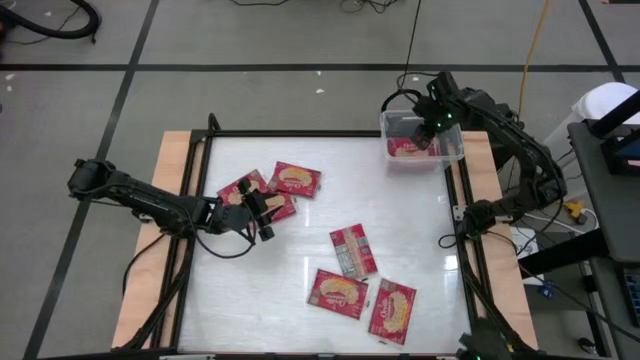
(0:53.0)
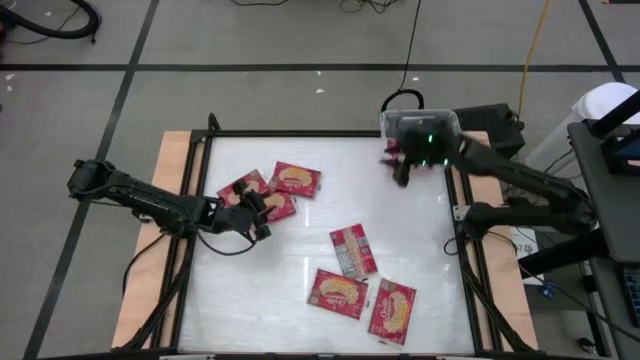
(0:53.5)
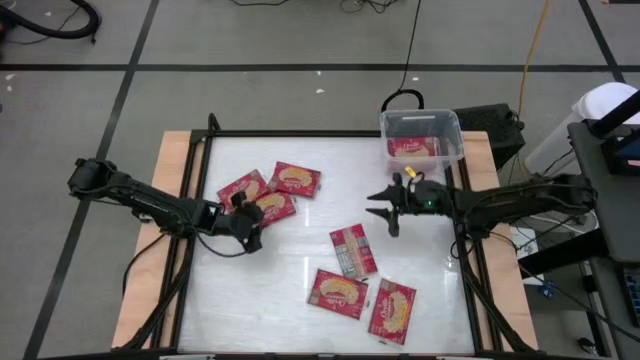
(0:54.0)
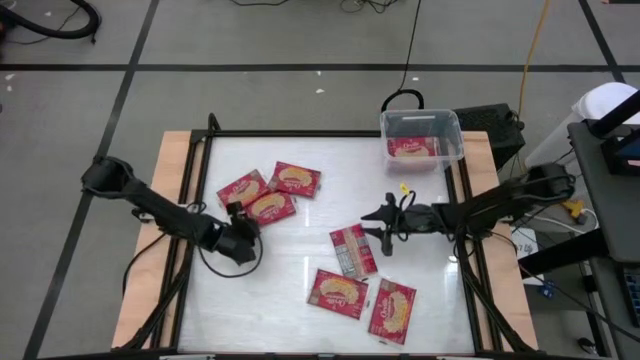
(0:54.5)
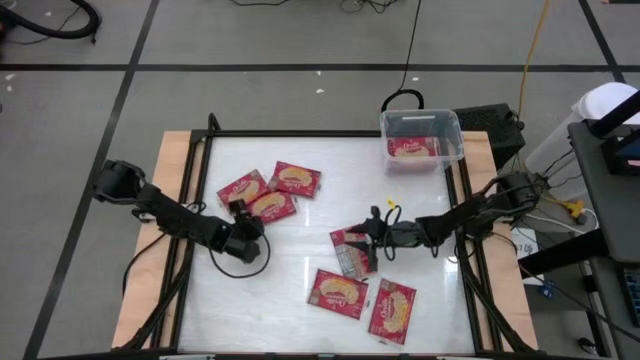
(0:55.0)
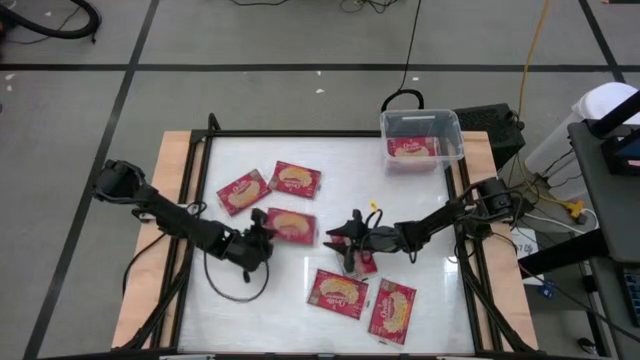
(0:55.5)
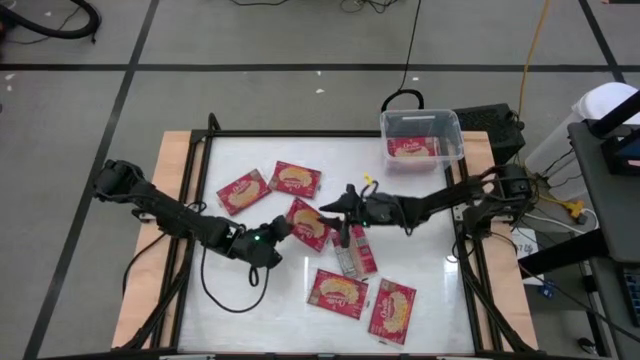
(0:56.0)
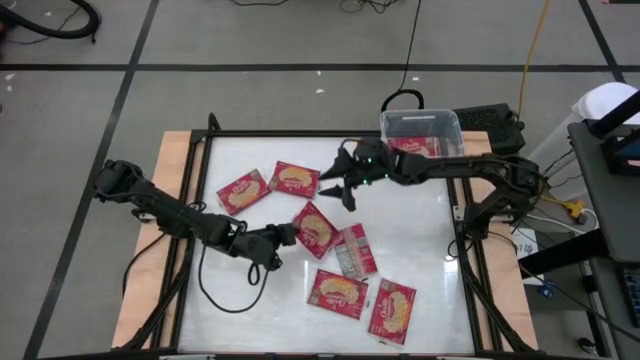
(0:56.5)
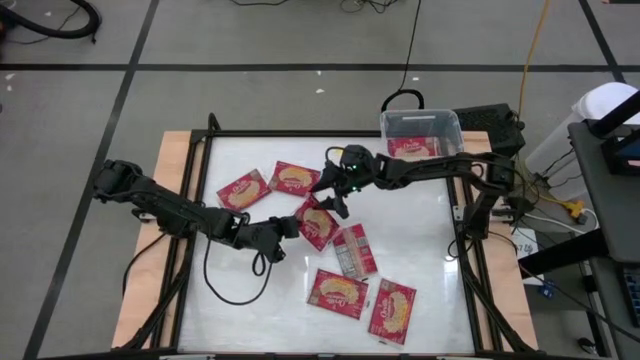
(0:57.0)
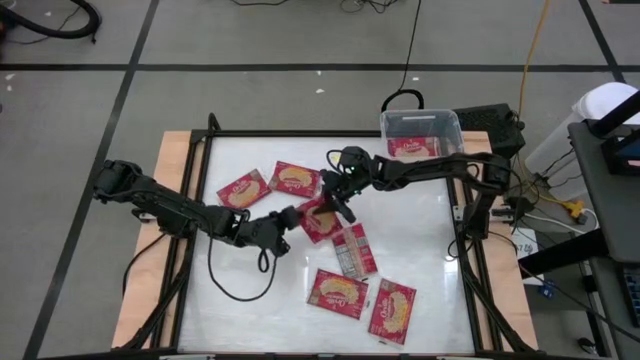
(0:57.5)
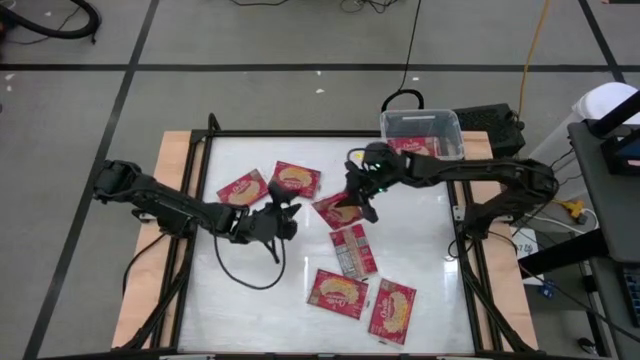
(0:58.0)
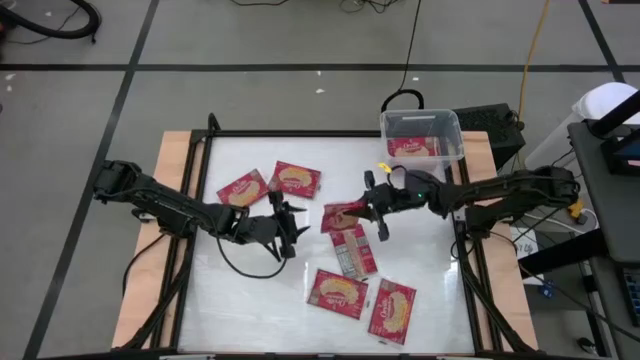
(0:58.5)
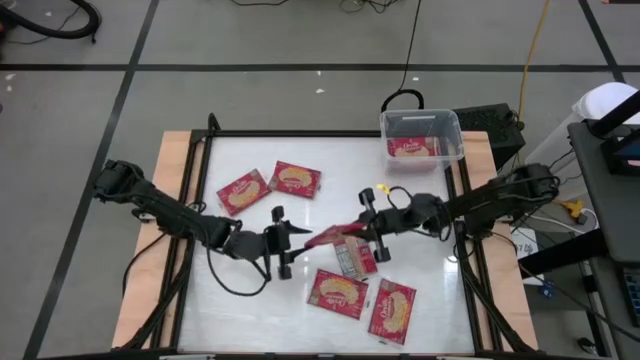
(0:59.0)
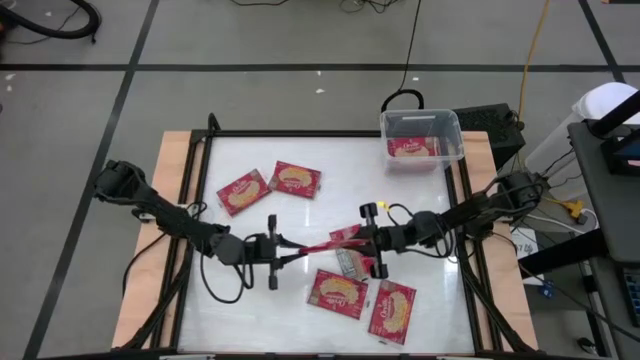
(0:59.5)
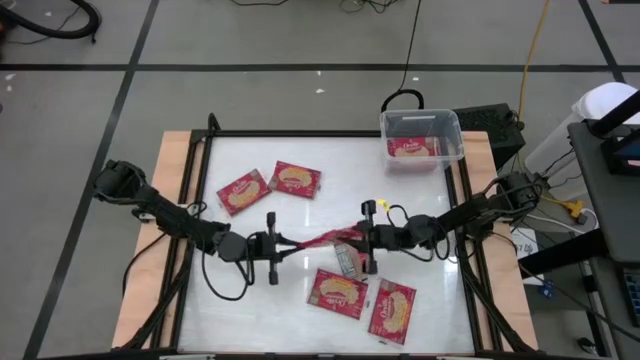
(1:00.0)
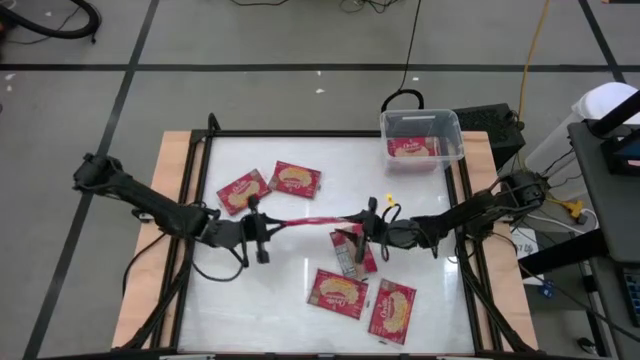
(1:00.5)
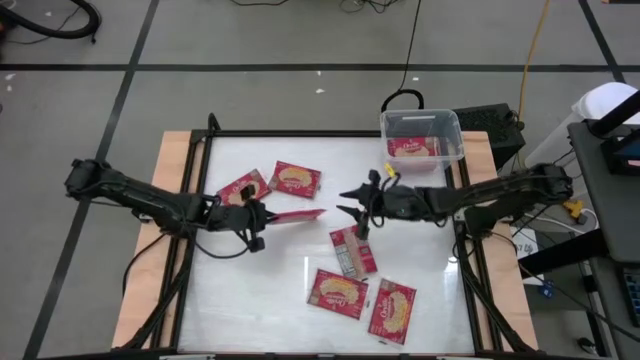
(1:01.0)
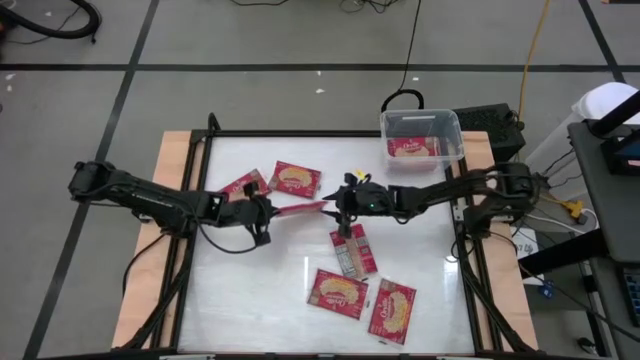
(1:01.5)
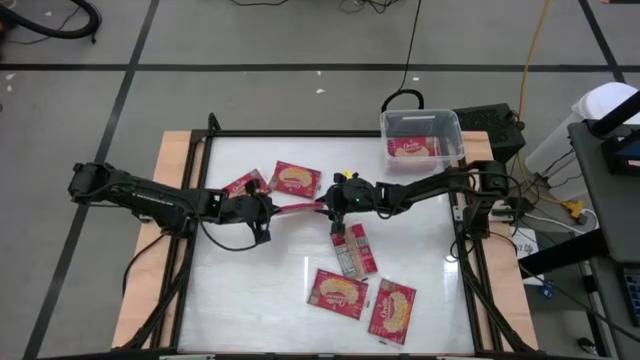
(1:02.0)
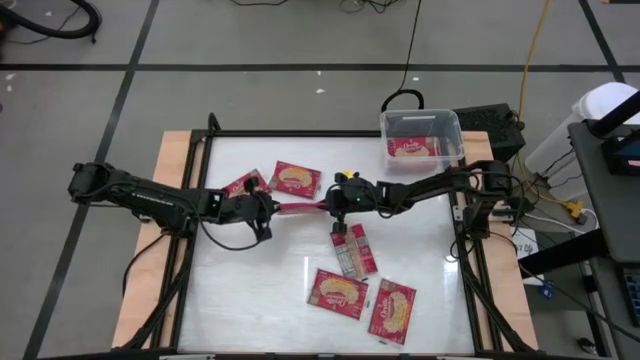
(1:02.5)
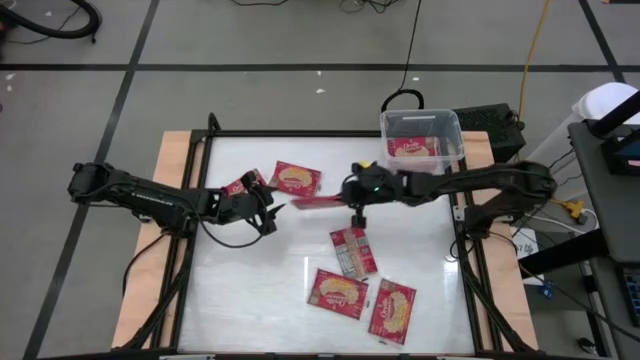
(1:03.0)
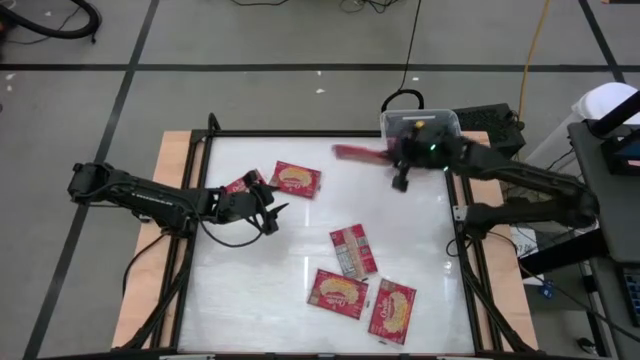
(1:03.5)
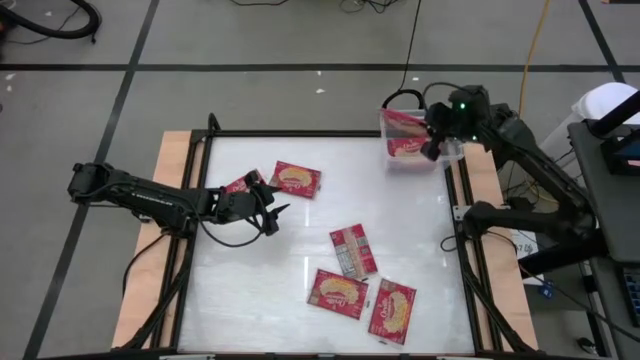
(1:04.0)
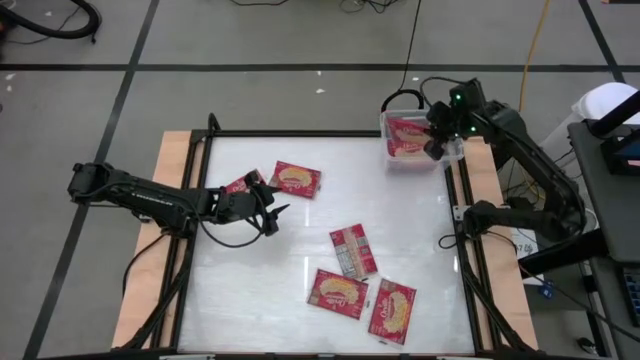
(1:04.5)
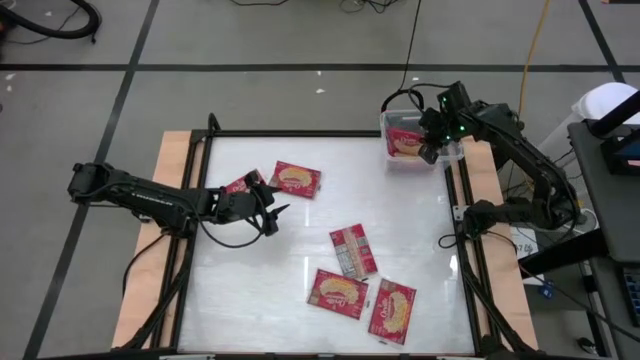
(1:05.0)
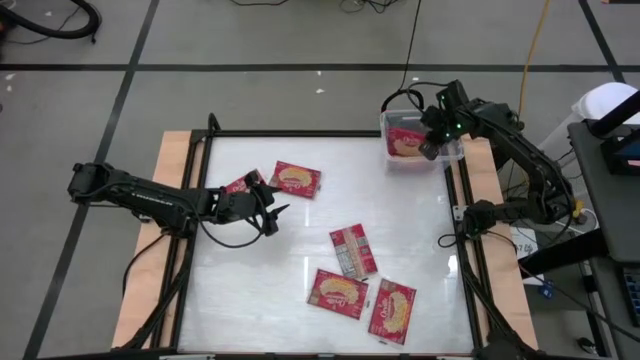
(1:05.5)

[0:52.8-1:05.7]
Task: Sort popcorn bags into baskets
Put the red popcorn bag into the transparent bin

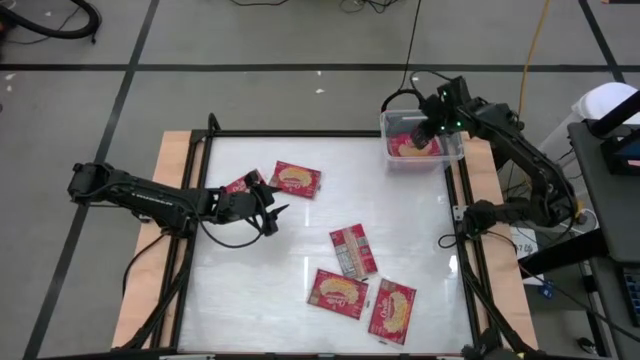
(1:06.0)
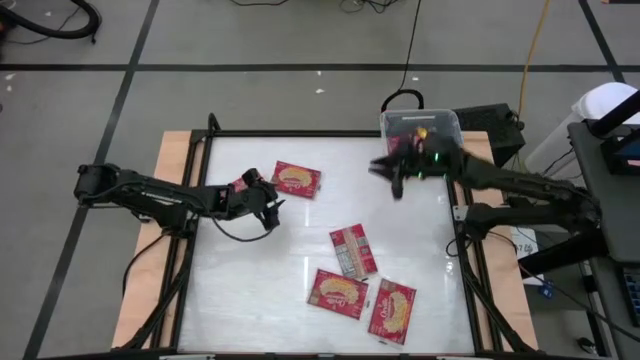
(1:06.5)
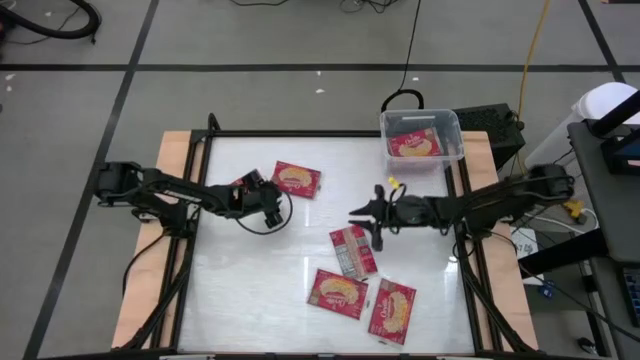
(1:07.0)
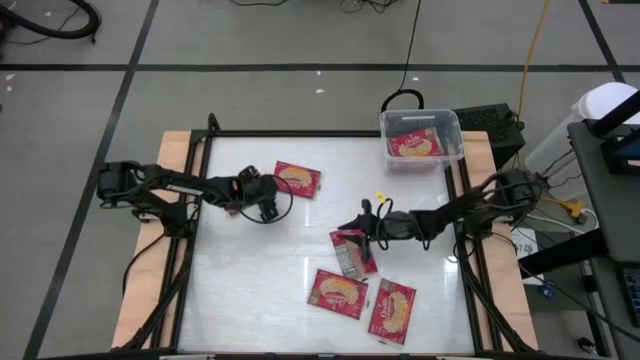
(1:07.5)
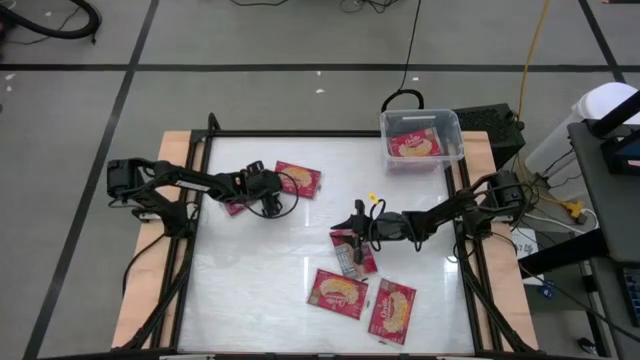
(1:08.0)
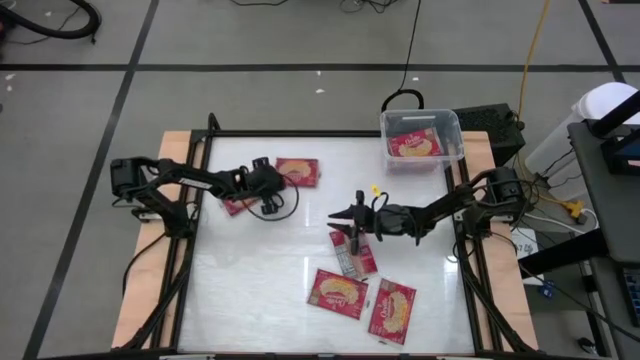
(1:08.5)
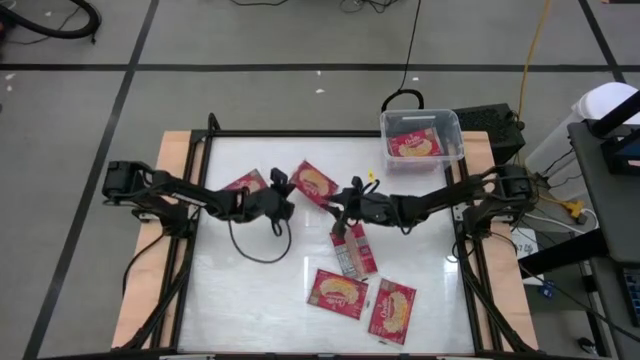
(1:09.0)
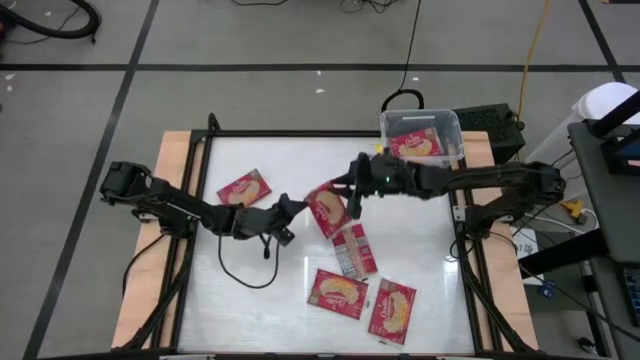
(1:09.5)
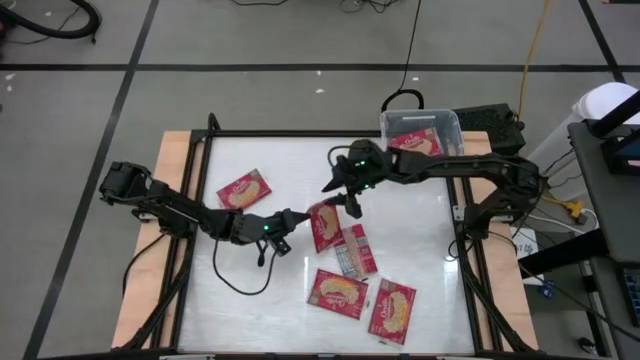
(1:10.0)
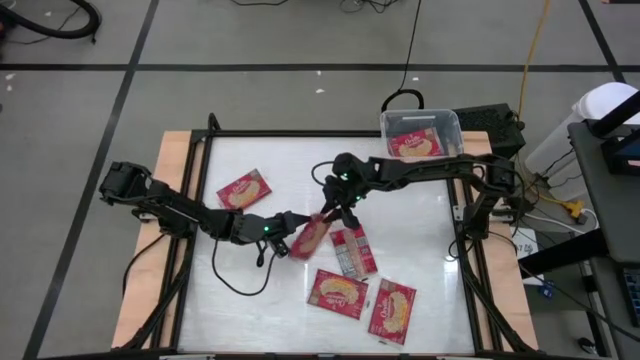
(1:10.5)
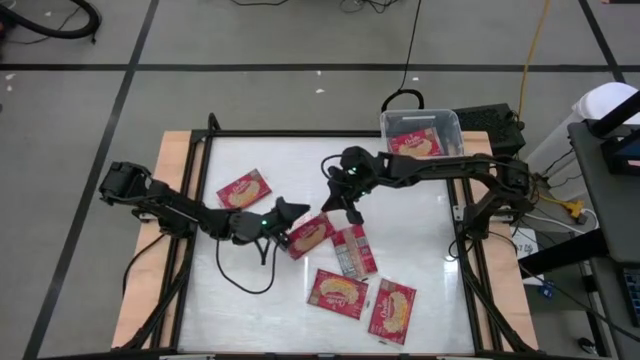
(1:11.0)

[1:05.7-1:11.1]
Put the red popcorn bag into the transparent bin

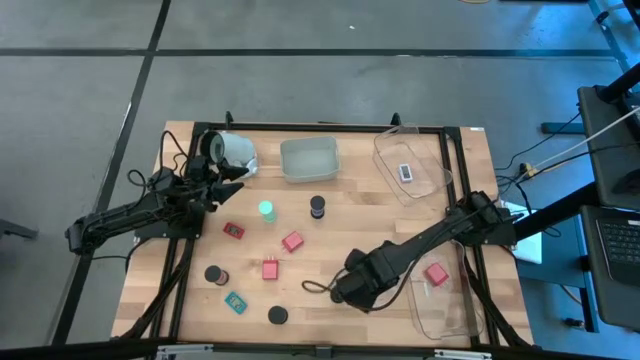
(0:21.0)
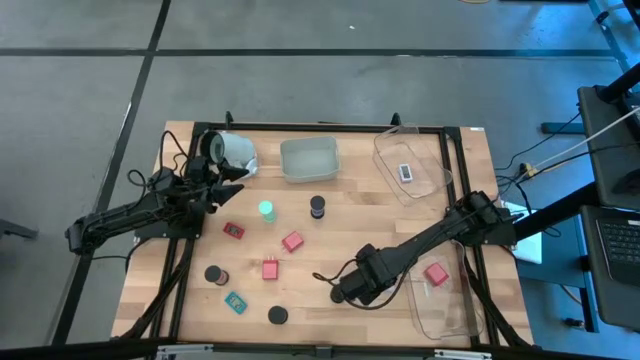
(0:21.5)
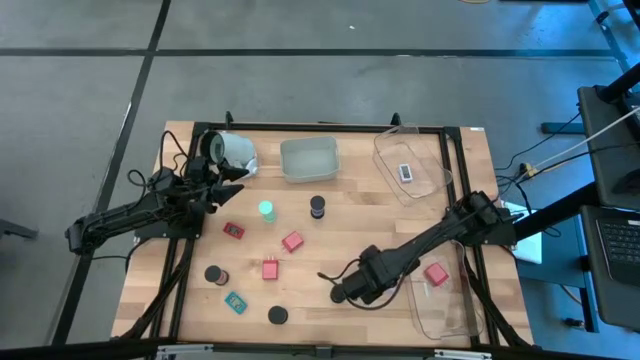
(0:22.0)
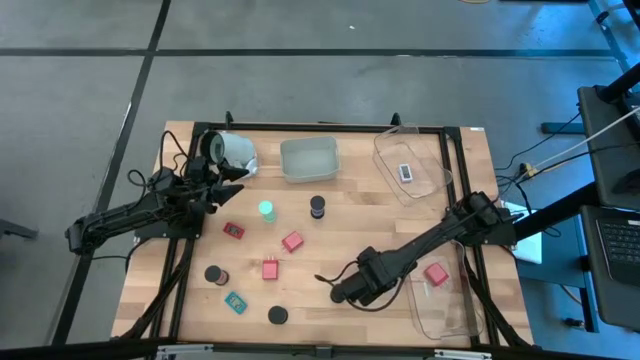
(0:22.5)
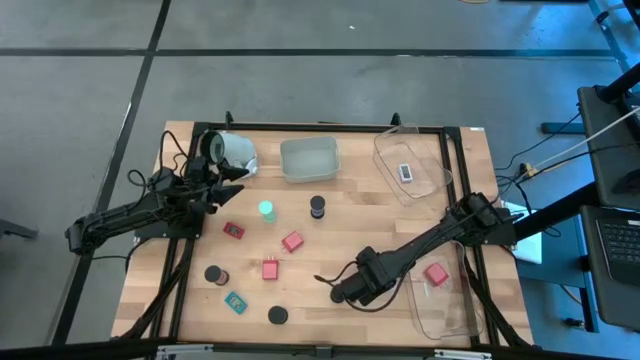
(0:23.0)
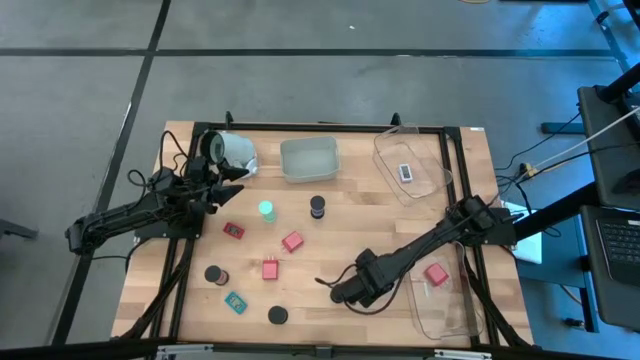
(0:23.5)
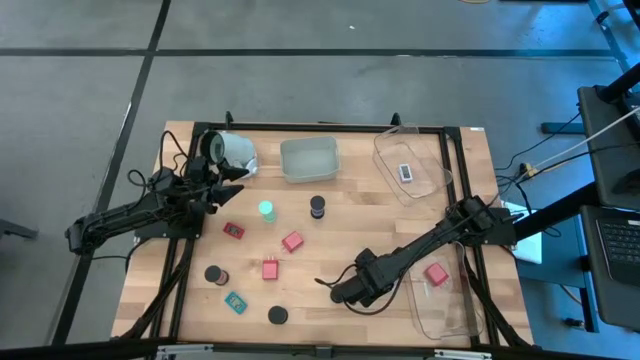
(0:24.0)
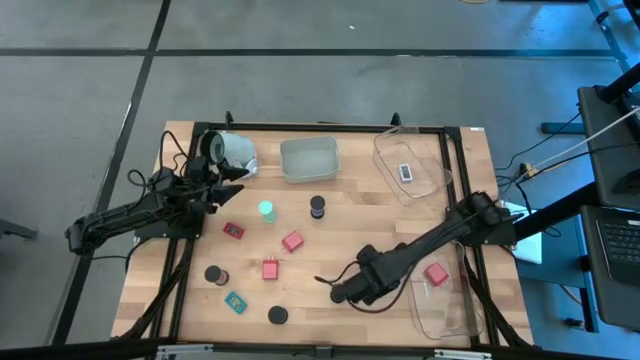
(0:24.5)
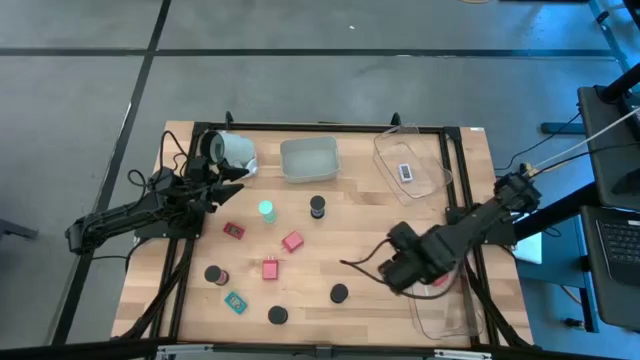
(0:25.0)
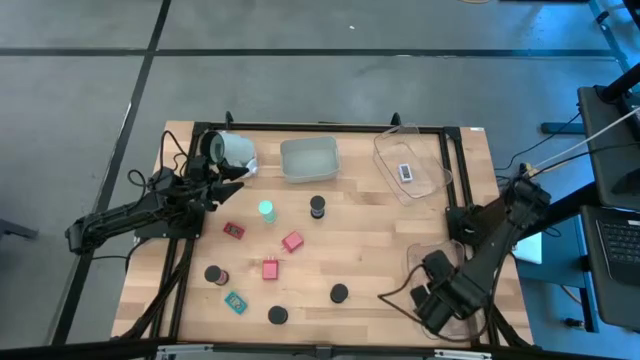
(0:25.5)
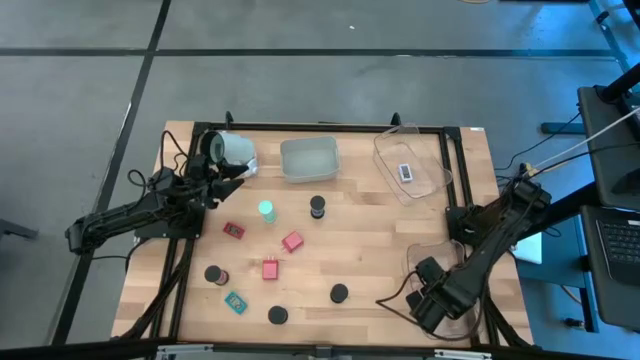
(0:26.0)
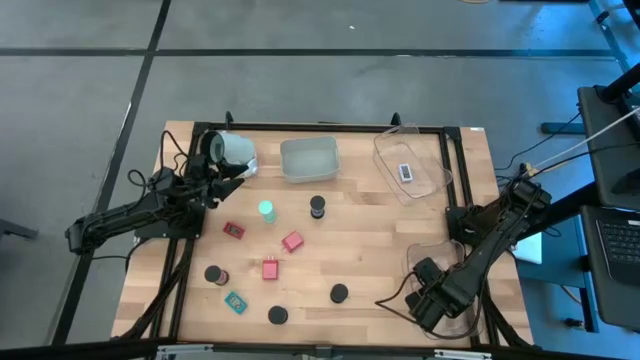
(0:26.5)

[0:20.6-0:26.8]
Task: Pick & Place Office items
Put the white charger adapter into the bottom transparent bin
